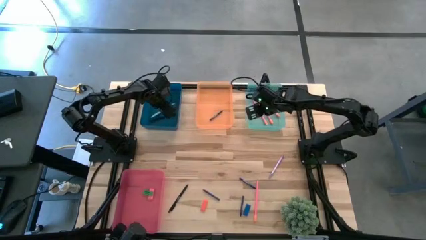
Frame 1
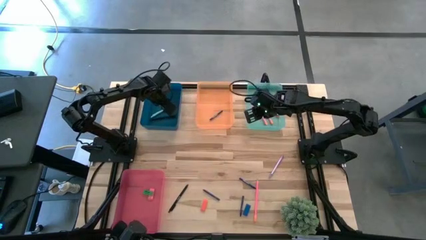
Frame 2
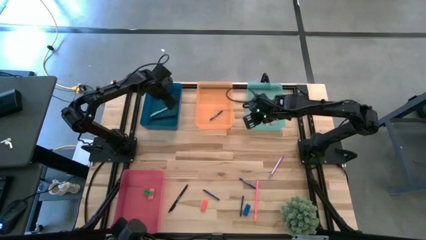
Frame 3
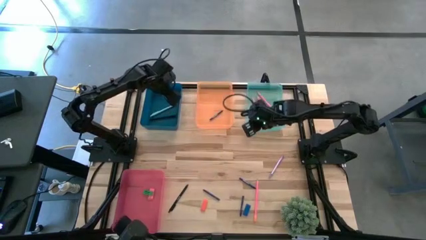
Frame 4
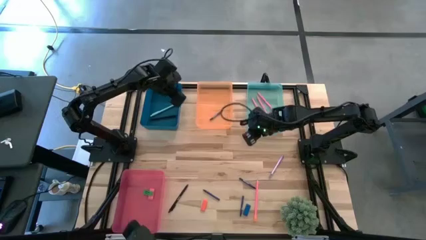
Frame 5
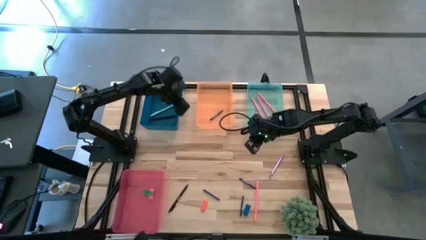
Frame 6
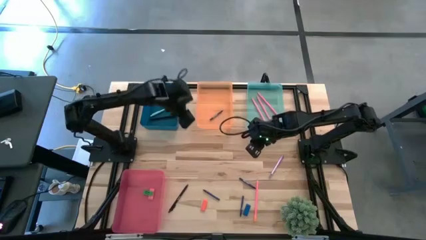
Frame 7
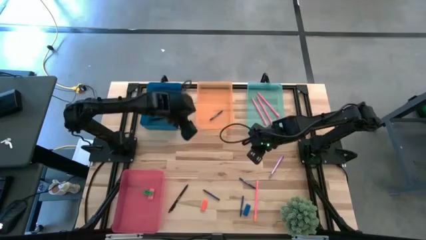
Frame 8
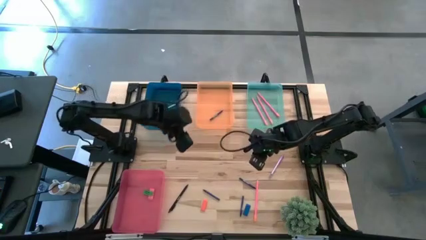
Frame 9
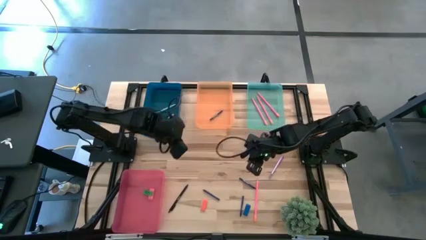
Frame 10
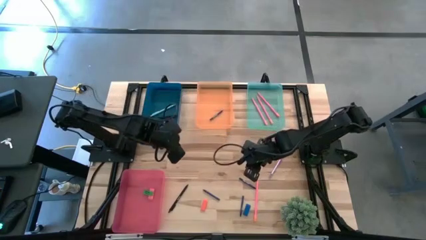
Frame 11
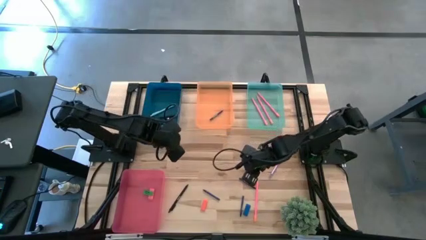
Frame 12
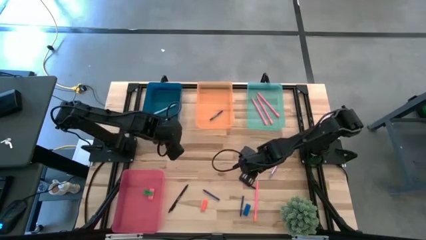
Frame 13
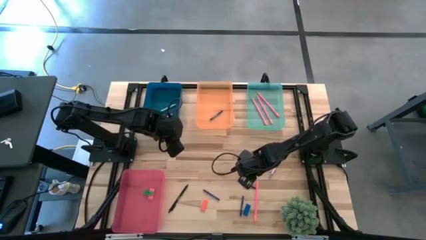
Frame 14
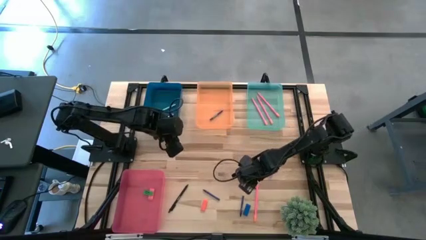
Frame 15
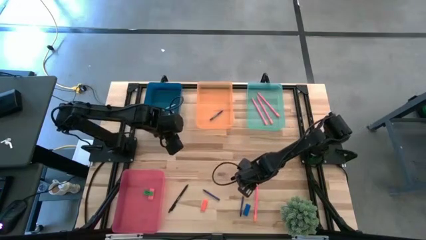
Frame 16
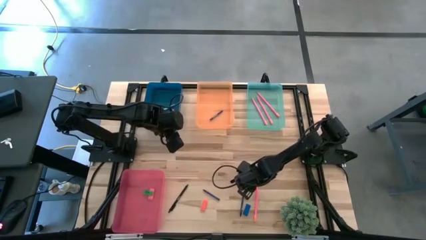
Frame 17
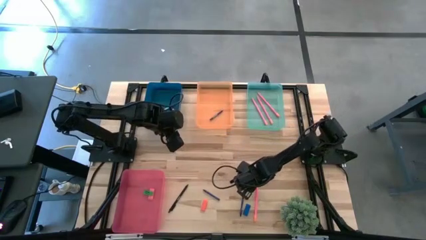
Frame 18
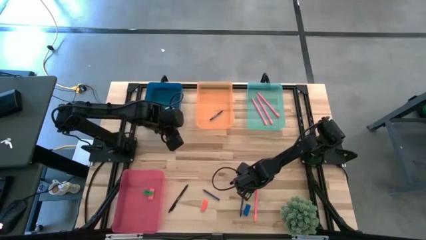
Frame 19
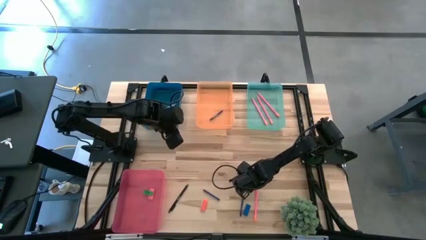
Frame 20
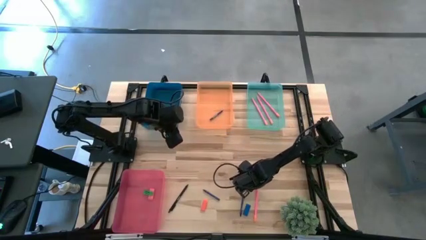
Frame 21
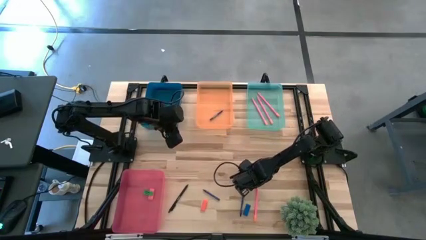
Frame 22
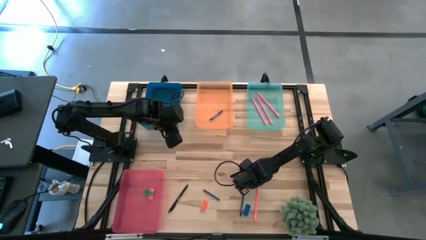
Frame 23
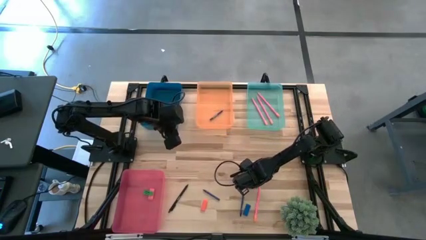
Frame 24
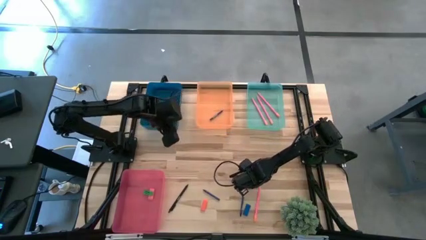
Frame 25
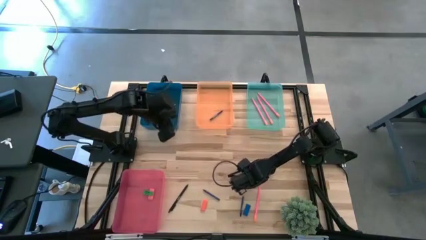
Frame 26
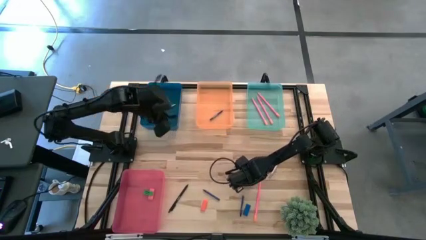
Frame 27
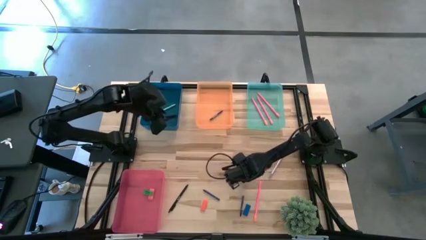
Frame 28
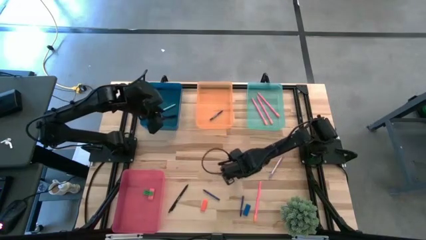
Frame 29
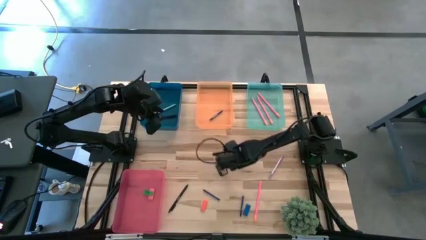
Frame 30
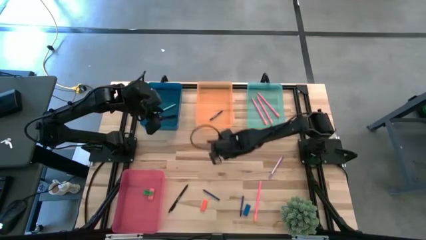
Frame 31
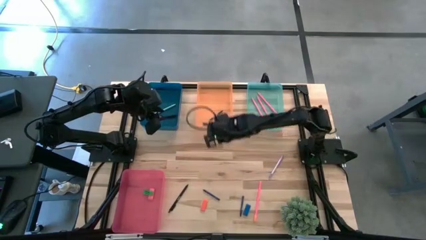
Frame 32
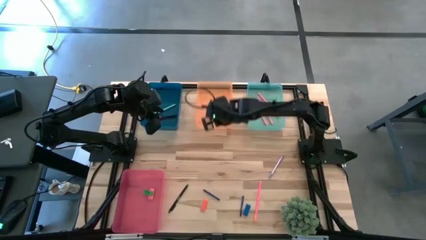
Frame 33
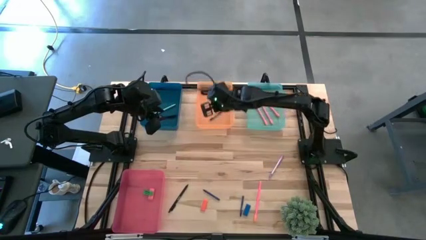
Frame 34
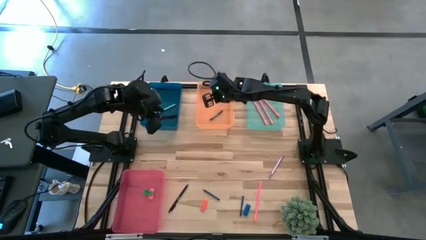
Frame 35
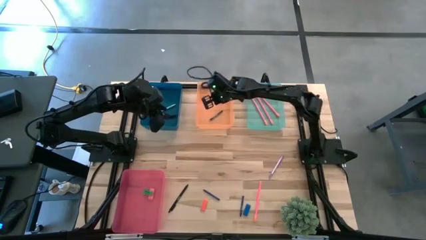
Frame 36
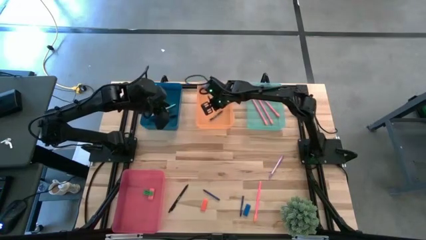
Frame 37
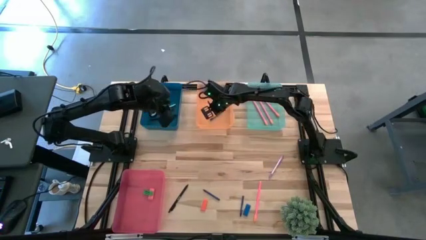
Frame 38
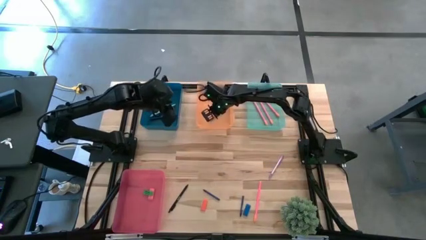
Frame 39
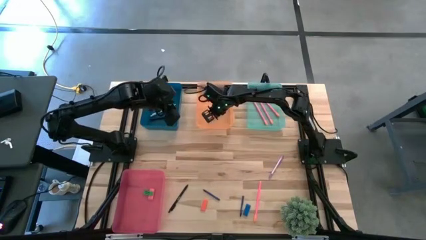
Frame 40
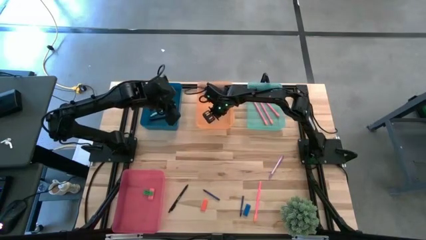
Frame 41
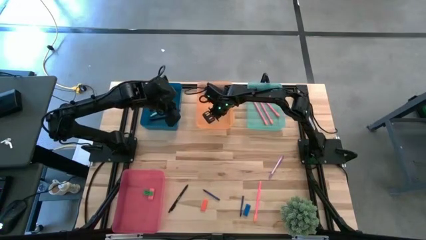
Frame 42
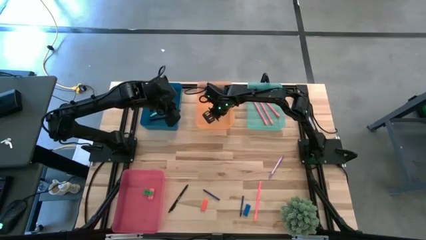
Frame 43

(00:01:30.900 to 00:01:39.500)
Task: Sort crayons/erasers/pens/pencils in bins
Put the blue crayon into the orange bin

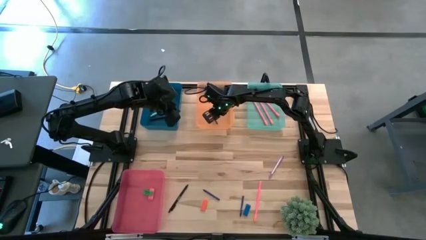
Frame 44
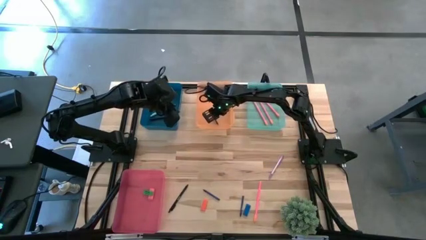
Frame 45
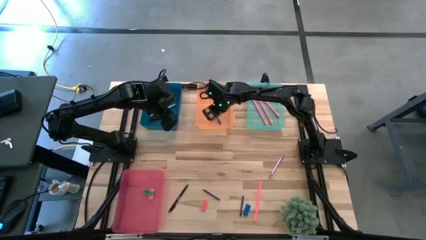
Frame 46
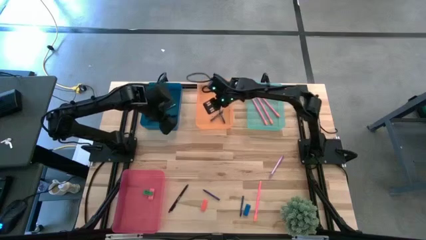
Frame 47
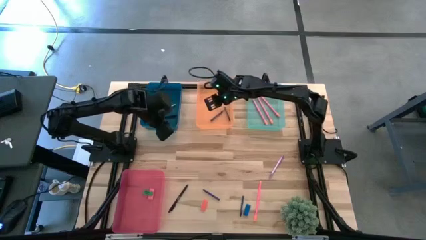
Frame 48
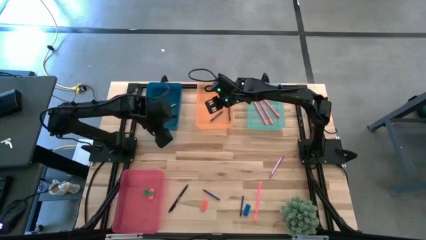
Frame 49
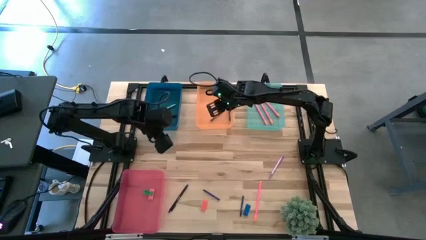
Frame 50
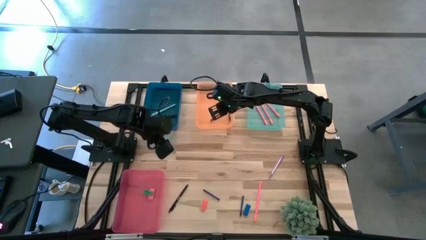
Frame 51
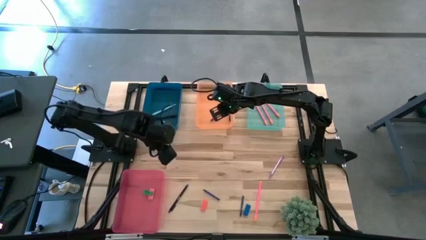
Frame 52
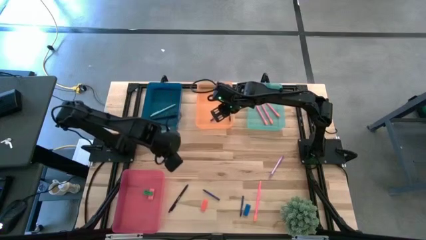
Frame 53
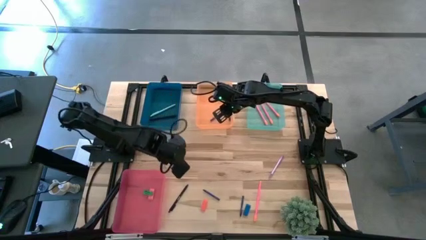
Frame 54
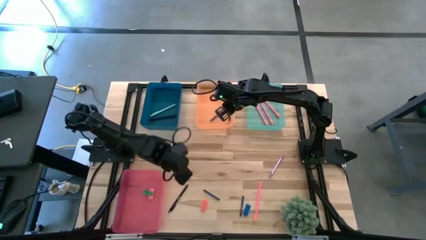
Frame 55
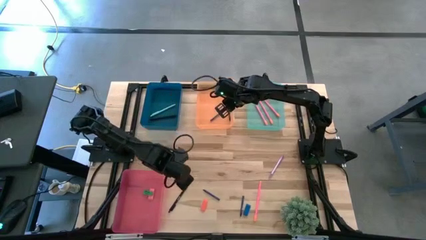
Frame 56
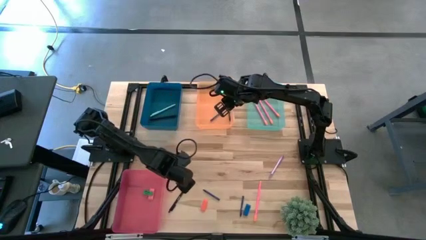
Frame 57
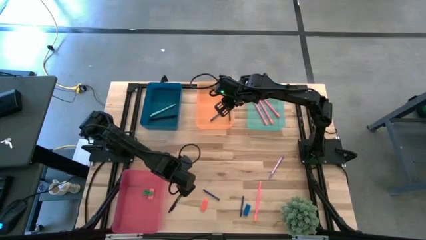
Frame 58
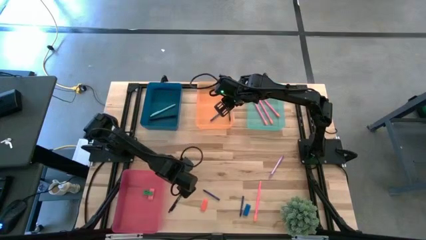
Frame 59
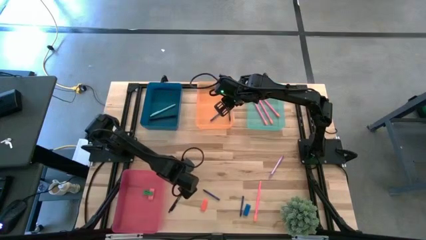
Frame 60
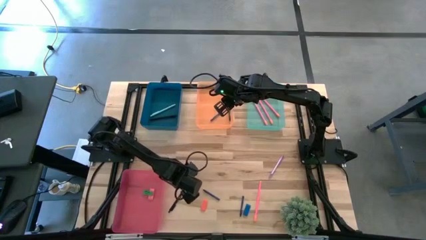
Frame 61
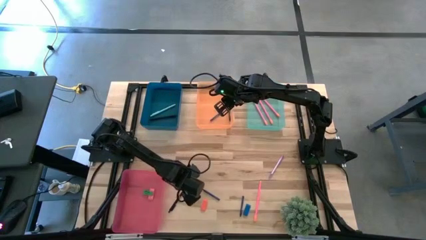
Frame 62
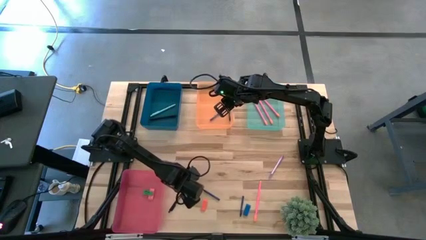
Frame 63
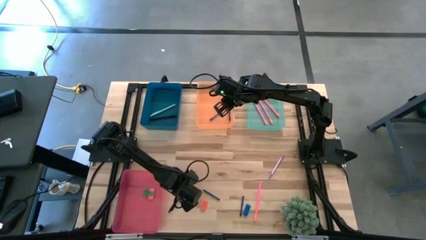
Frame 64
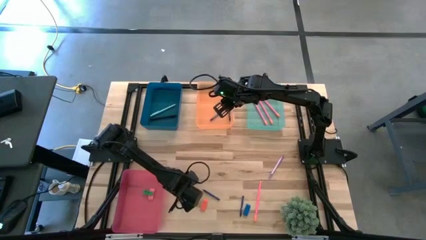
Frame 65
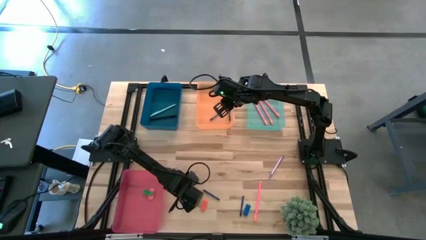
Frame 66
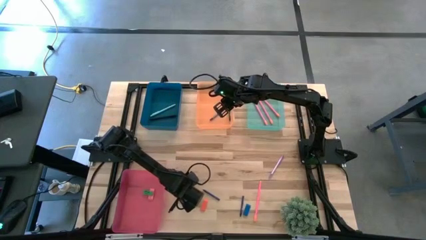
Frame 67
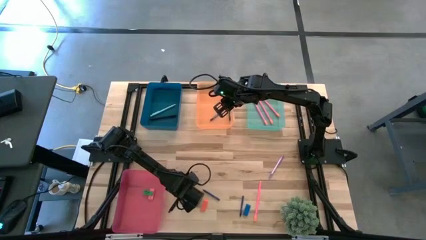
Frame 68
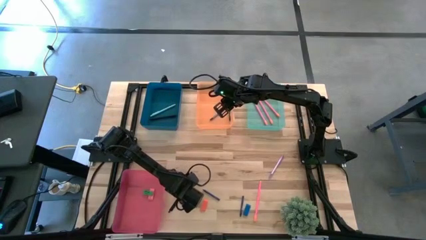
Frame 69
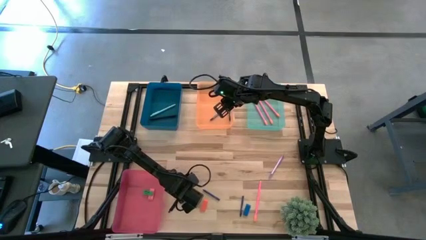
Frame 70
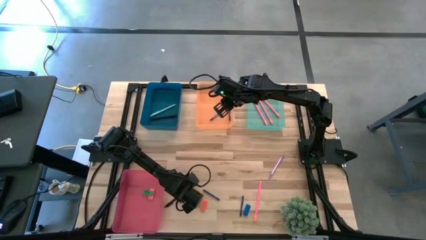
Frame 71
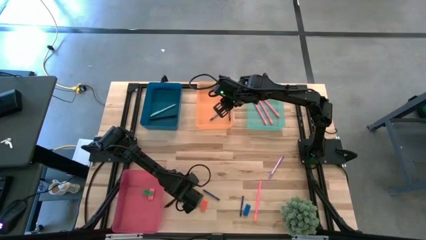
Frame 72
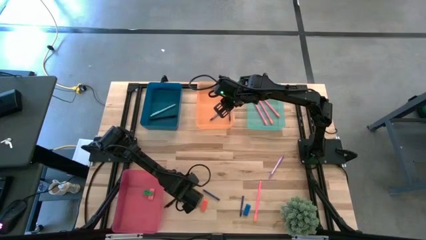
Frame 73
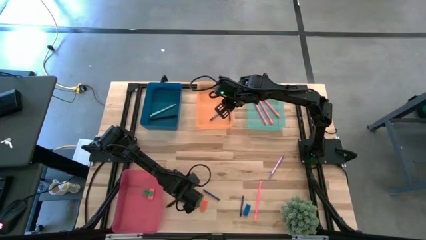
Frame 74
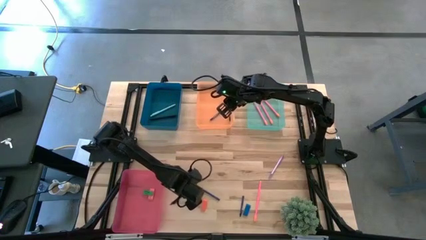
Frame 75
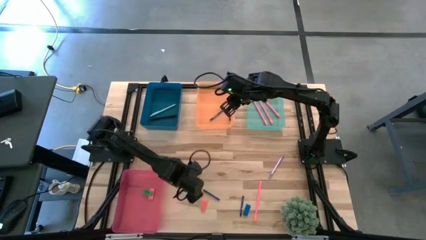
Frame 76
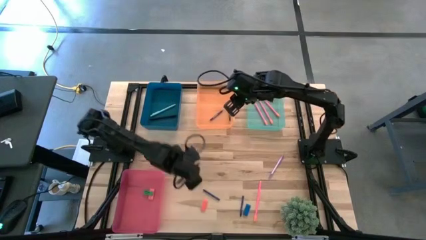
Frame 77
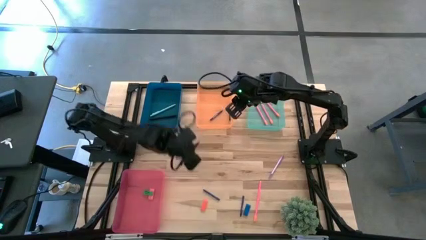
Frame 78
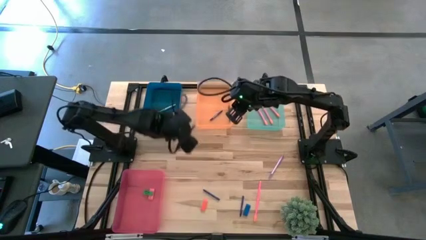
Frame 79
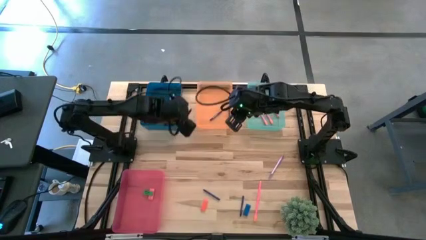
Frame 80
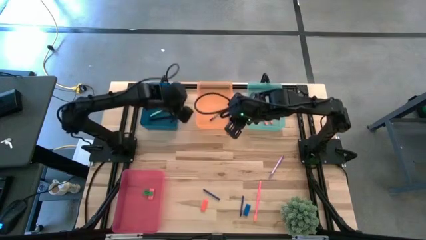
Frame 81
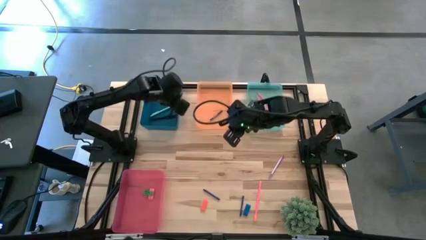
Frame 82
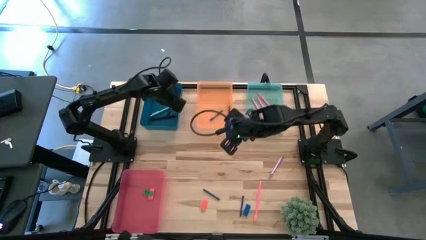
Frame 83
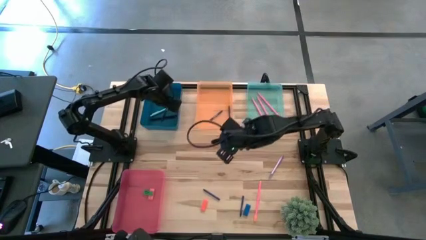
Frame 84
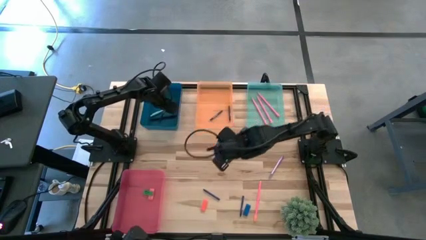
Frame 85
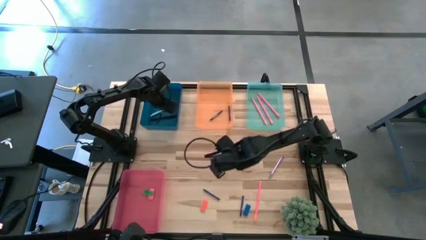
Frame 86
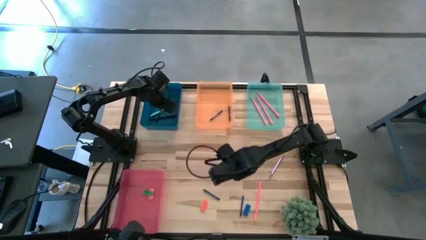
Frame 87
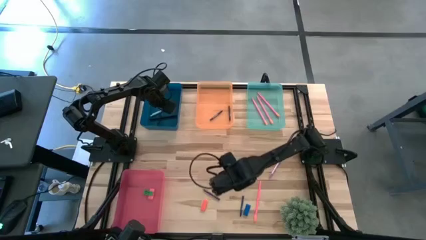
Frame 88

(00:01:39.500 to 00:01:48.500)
Put the black pen into the blue bin
